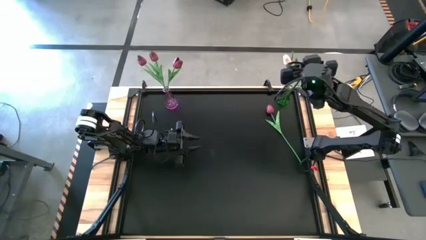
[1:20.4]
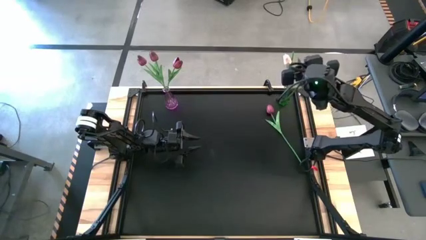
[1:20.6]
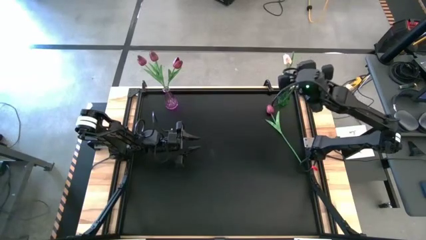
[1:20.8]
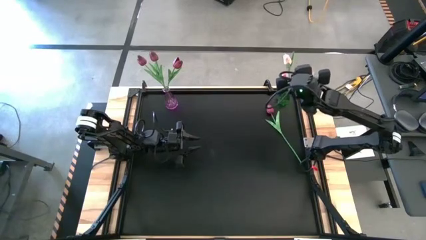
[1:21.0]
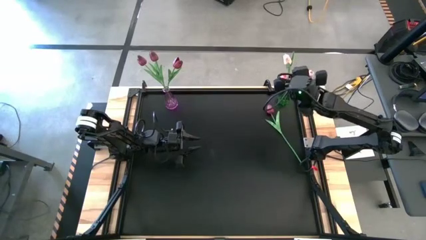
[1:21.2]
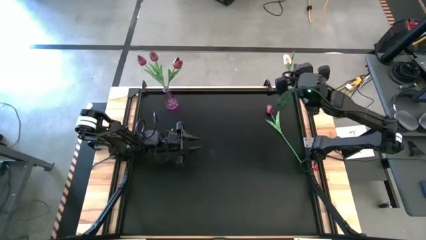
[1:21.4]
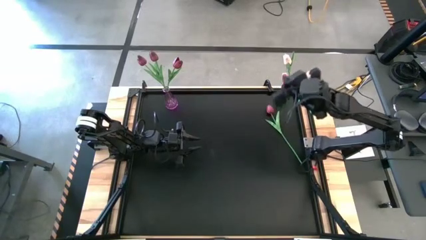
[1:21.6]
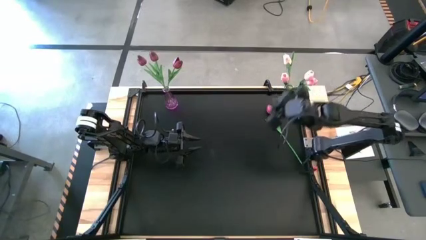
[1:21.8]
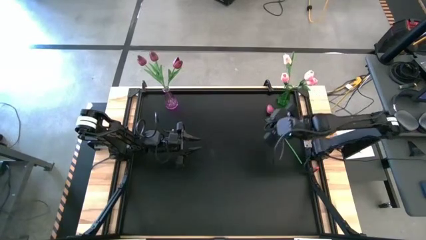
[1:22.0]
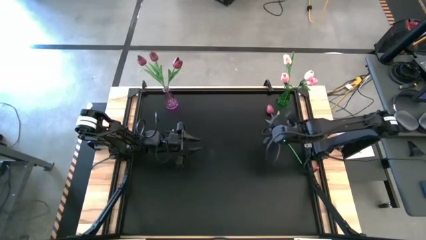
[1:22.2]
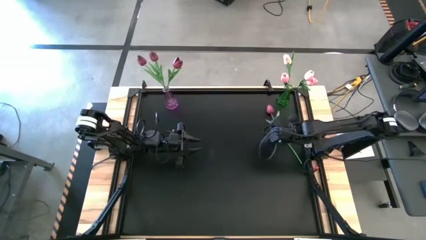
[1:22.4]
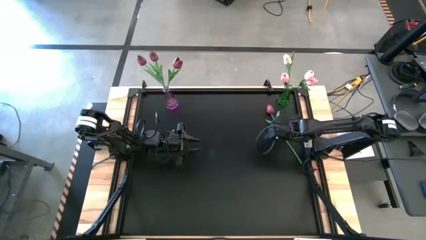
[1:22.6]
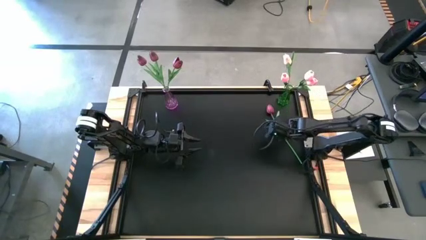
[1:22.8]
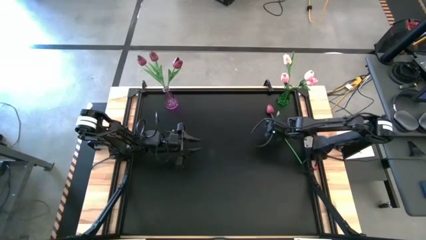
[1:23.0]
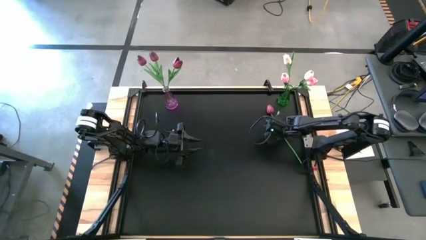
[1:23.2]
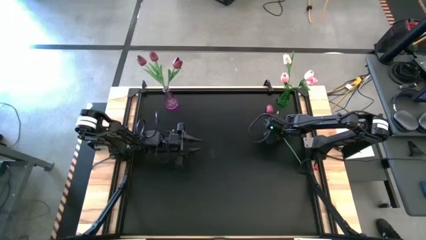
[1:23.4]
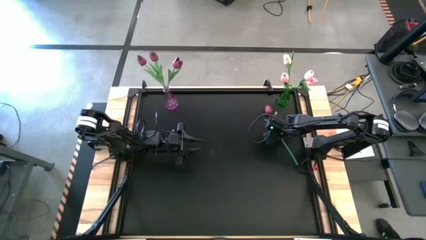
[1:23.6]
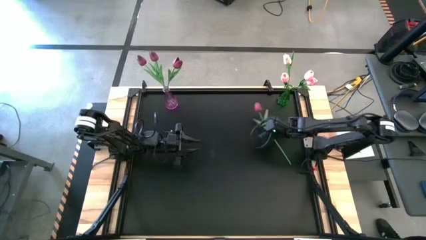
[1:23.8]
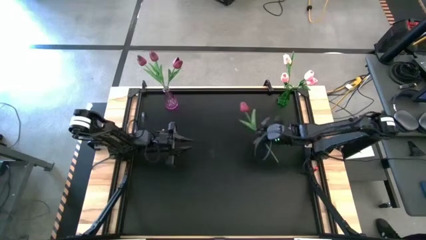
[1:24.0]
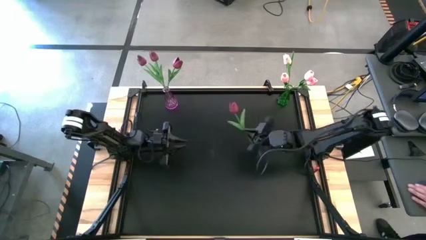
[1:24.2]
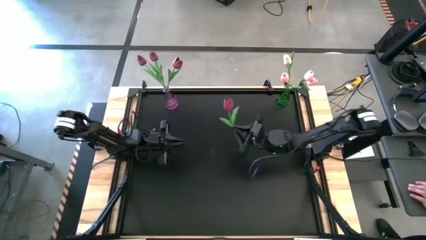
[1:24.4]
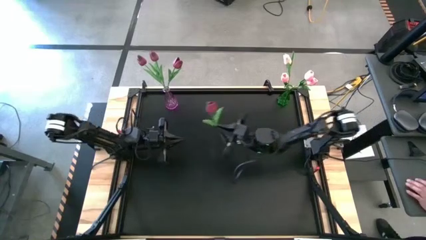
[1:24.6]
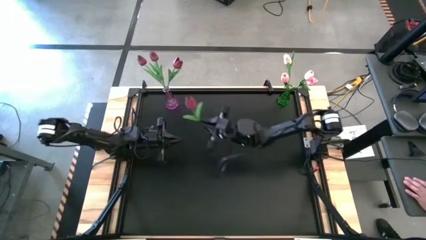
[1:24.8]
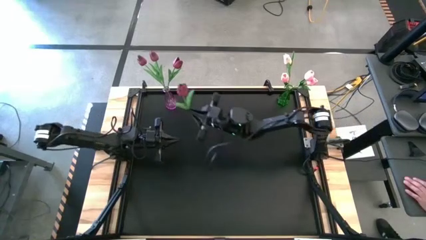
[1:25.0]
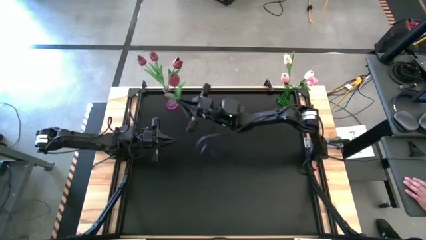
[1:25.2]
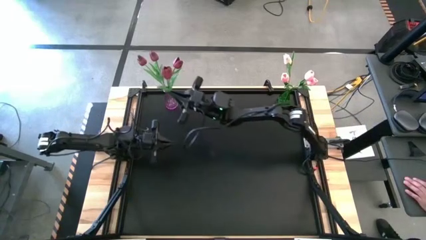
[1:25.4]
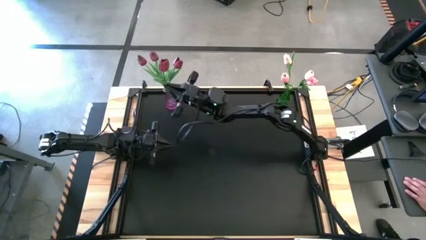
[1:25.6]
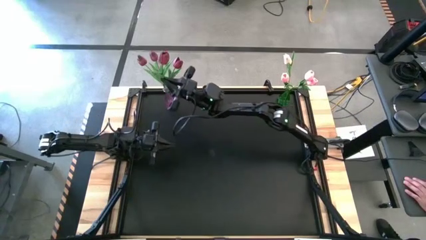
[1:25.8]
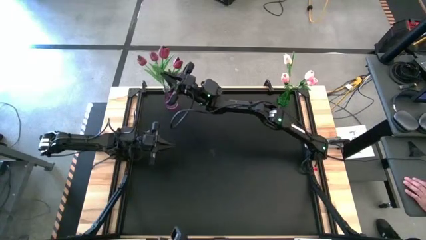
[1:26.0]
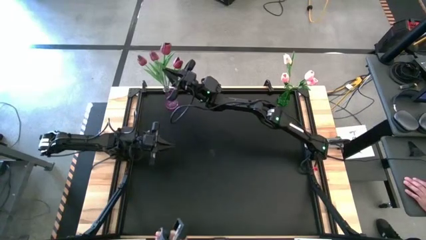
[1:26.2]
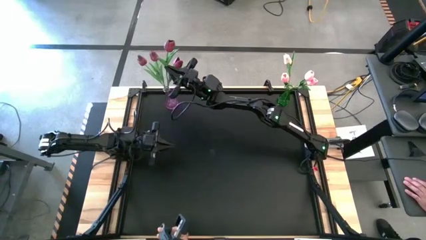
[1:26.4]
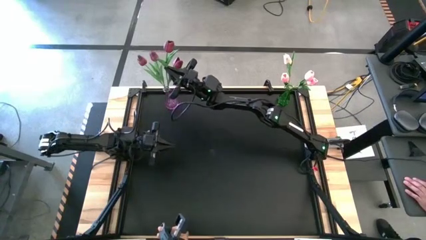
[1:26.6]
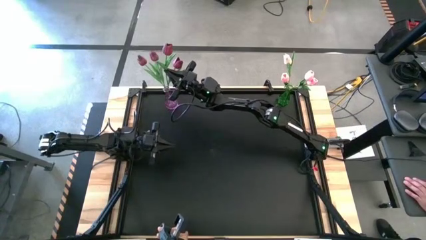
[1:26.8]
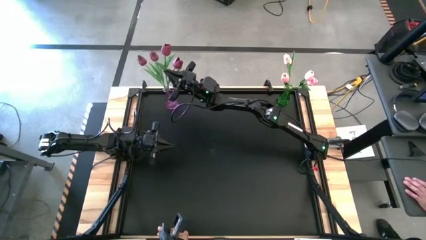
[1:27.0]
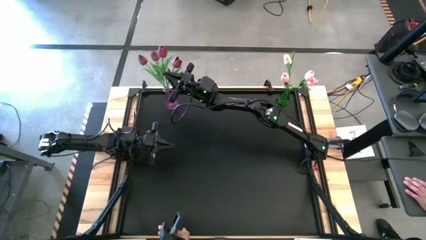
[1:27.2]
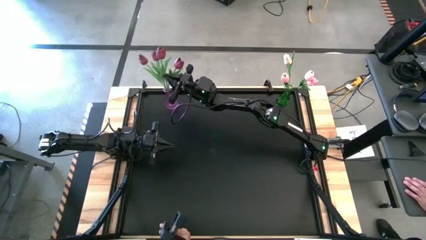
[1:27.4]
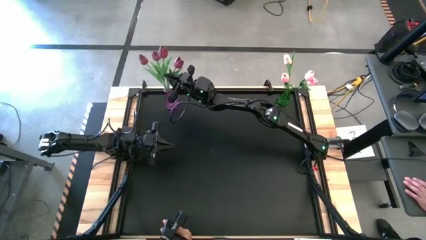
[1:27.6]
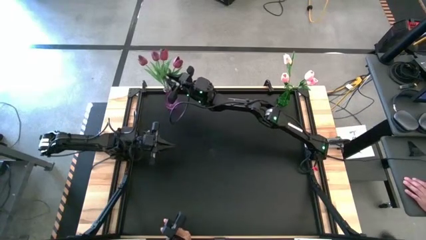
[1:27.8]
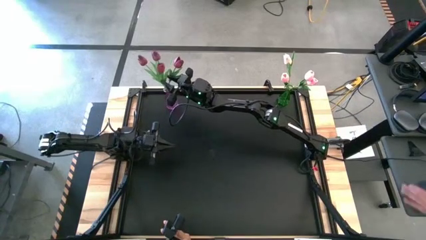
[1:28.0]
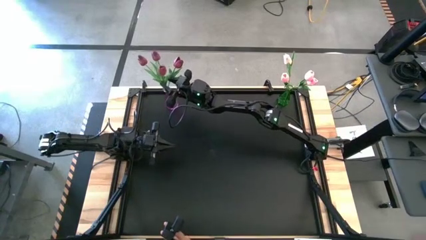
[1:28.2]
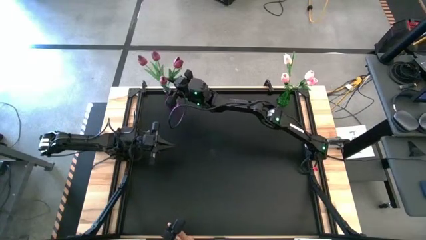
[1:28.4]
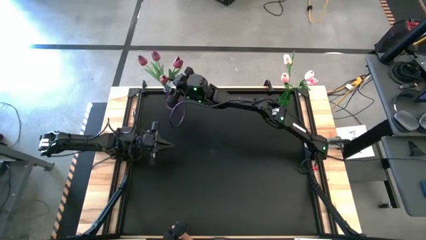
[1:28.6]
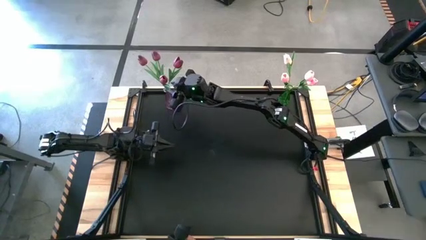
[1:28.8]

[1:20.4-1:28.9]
Task: Sort flowers into vase by color
Put the red flower into the violet vase

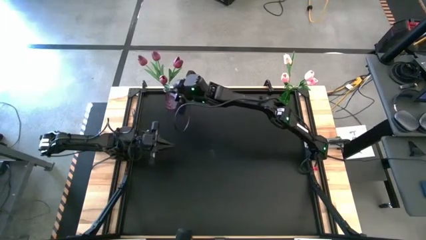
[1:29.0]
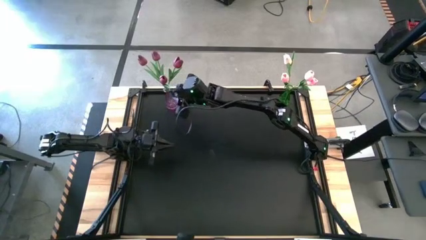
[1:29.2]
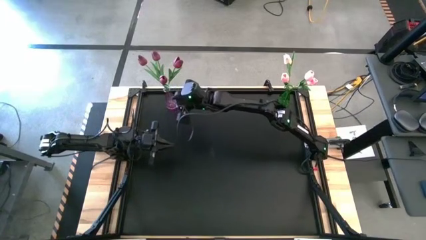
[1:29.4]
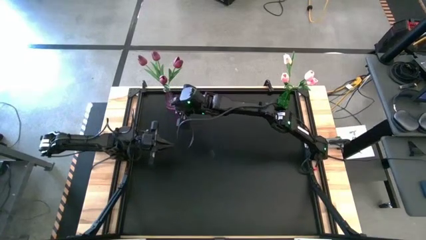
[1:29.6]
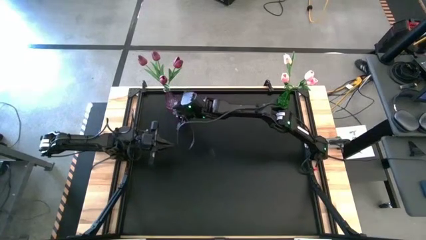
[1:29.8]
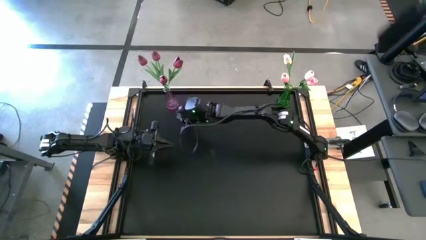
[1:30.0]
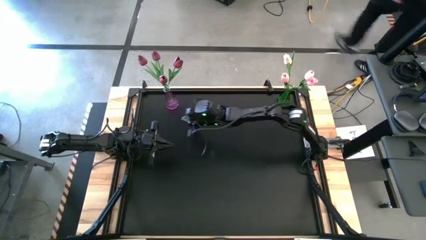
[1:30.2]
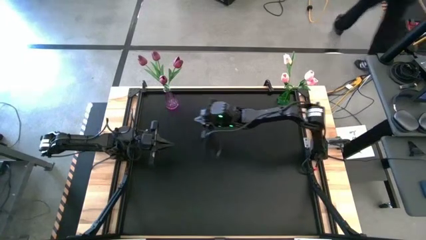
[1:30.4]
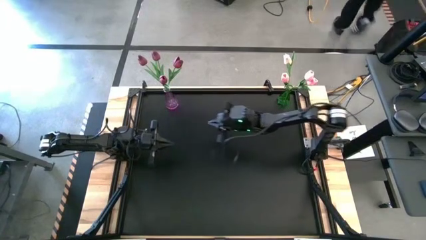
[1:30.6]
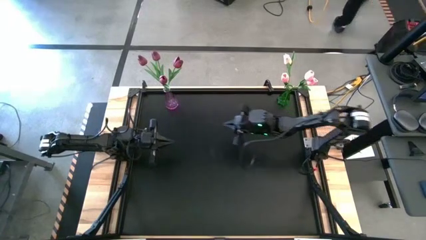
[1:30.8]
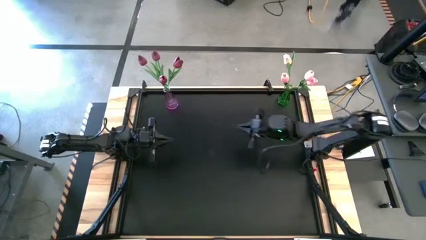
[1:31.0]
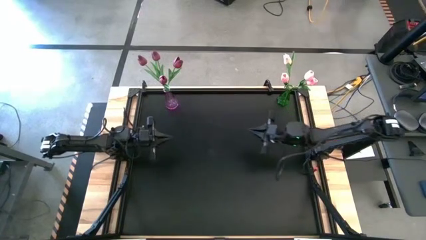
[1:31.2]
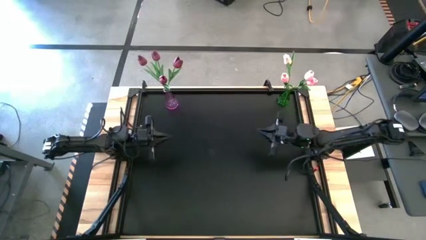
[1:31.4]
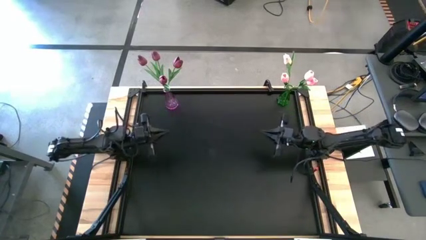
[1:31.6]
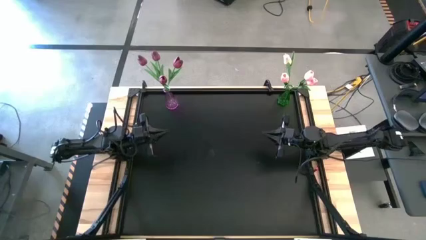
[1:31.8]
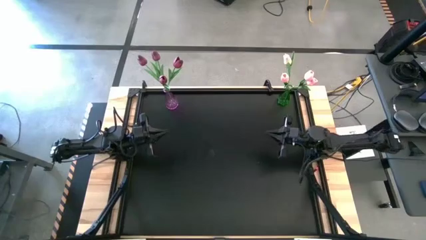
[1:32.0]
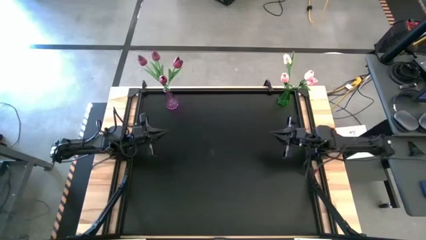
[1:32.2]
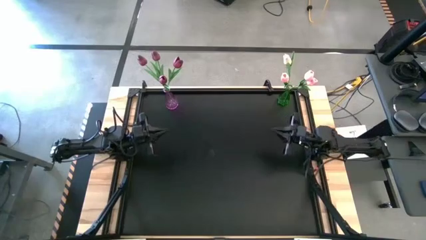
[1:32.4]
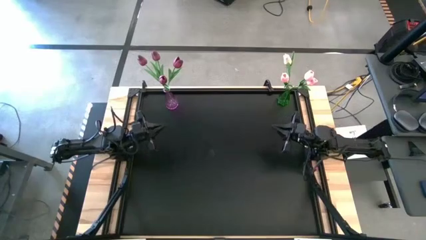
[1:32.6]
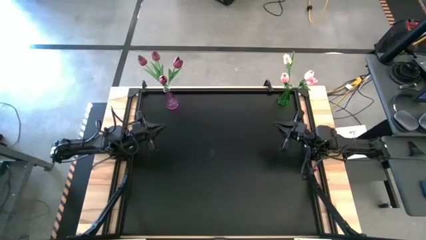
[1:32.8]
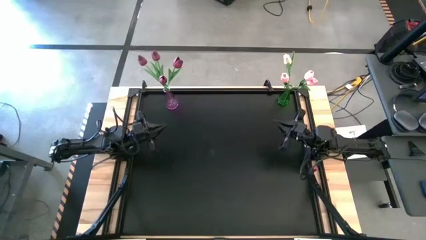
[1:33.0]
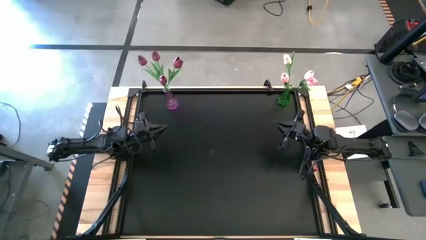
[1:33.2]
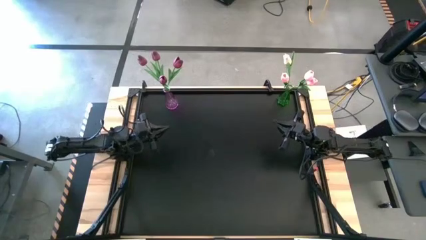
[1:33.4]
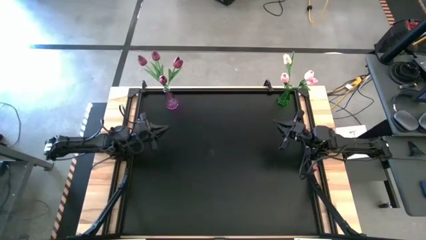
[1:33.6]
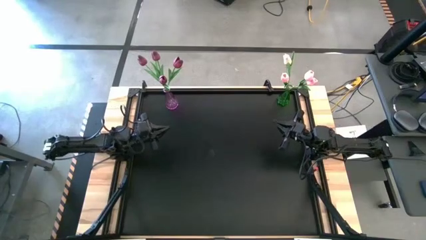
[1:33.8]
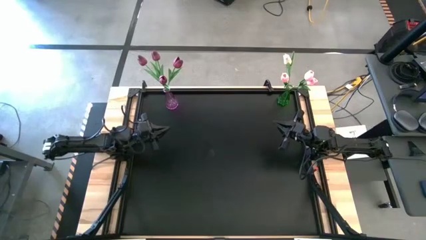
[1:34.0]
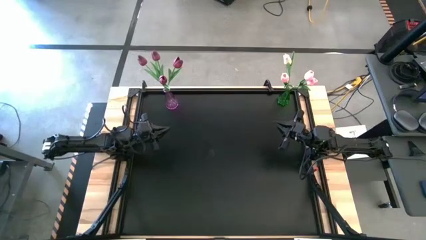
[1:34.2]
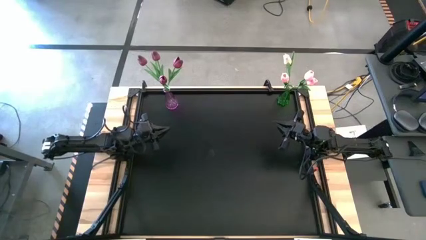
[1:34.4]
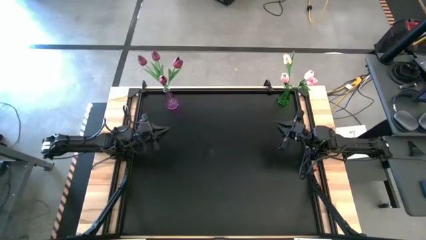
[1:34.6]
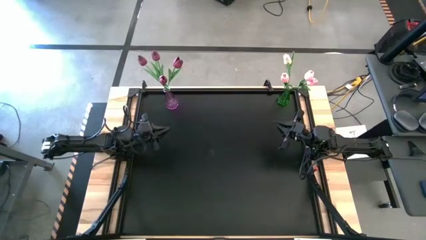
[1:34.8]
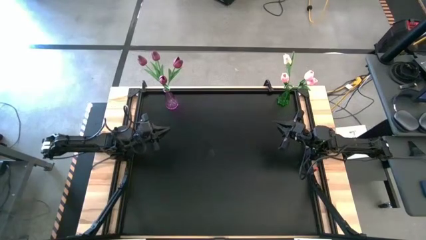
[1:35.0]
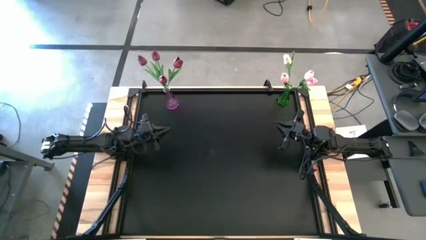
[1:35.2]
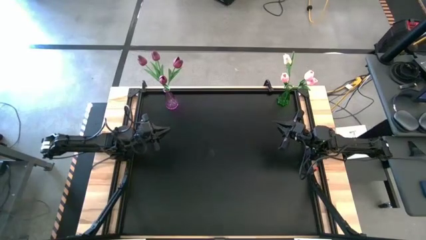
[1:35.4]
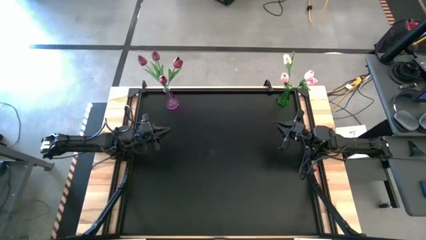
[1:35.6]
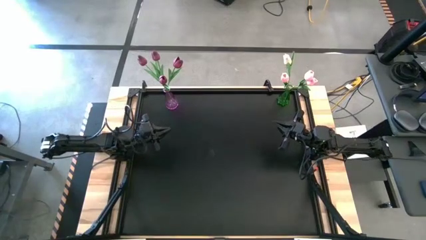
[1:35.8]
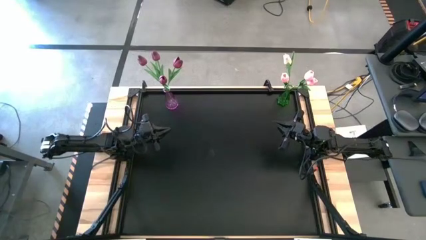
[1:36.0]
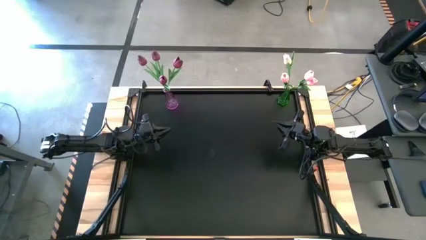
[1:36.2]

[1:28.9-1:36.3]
Return to Home Position
